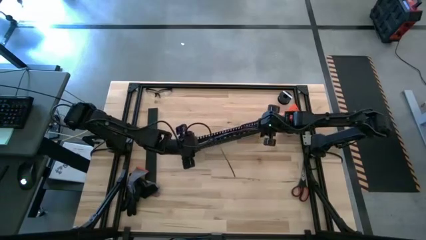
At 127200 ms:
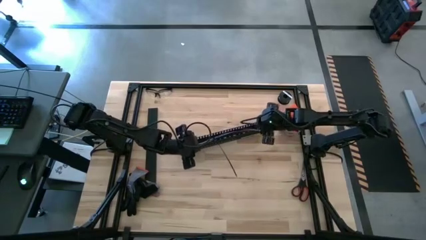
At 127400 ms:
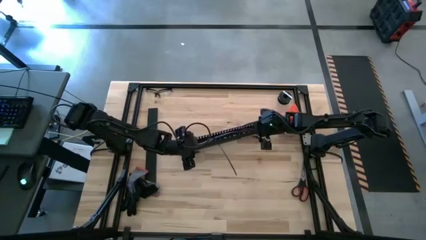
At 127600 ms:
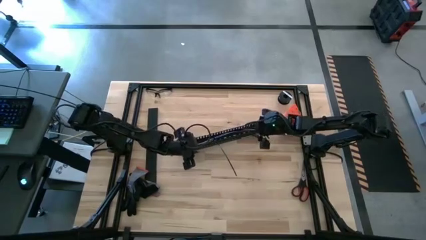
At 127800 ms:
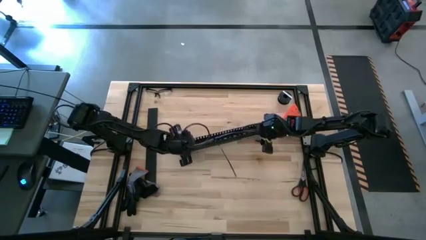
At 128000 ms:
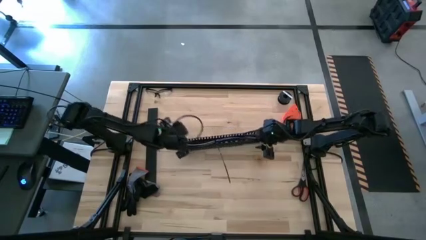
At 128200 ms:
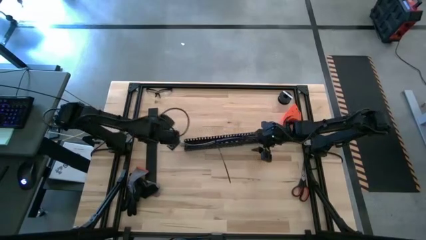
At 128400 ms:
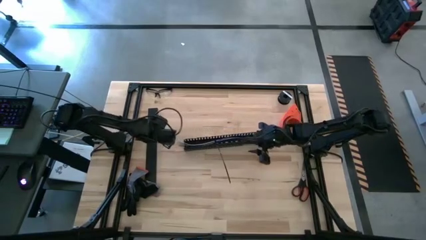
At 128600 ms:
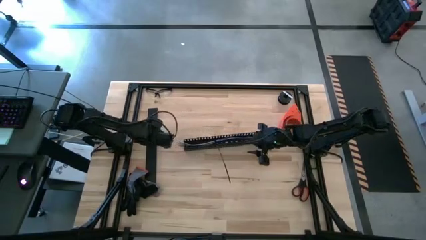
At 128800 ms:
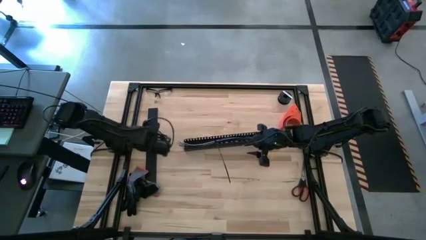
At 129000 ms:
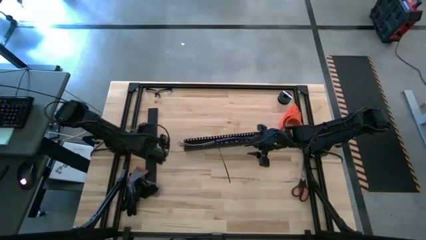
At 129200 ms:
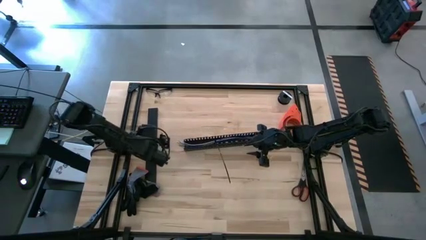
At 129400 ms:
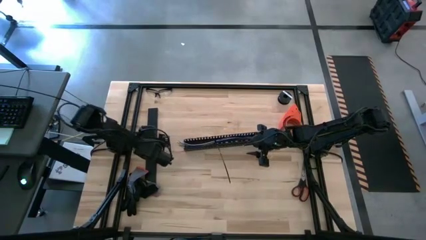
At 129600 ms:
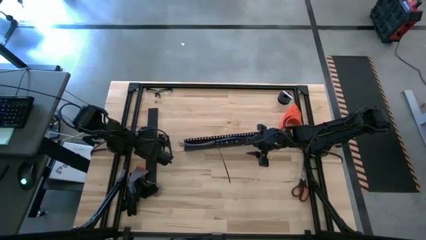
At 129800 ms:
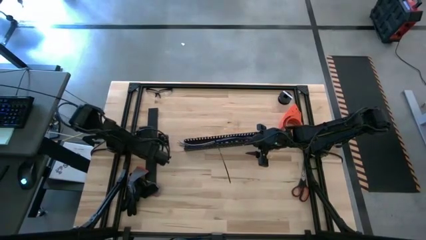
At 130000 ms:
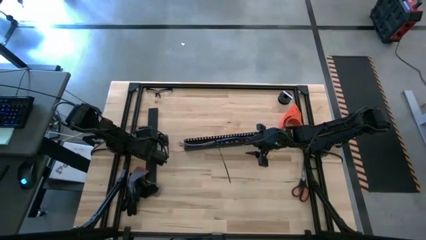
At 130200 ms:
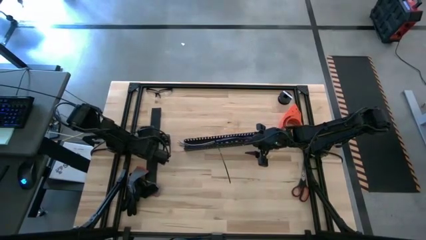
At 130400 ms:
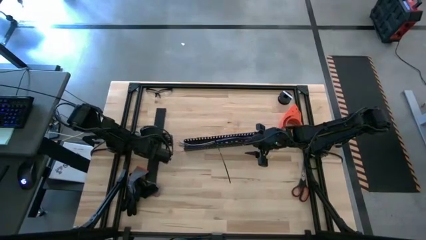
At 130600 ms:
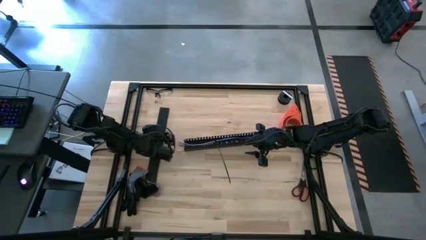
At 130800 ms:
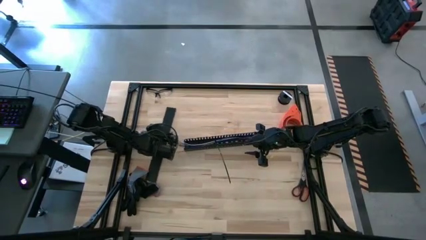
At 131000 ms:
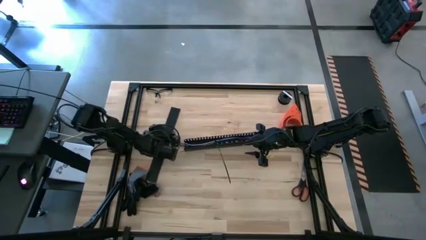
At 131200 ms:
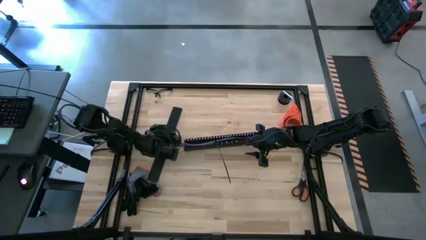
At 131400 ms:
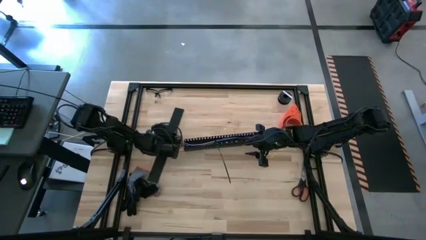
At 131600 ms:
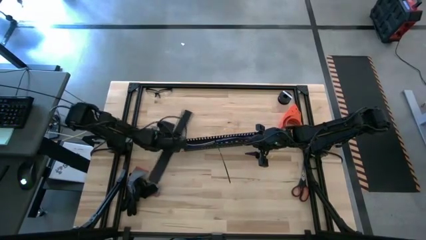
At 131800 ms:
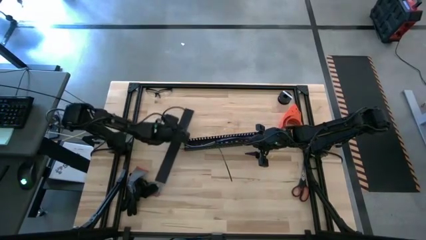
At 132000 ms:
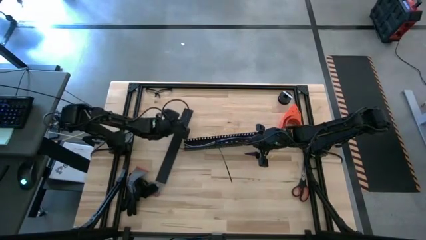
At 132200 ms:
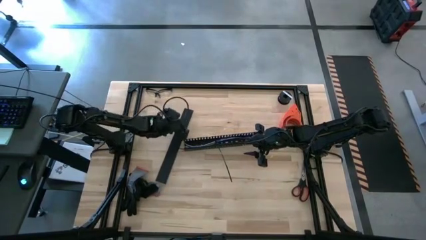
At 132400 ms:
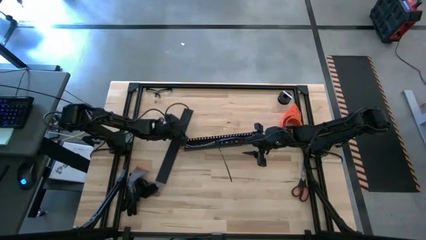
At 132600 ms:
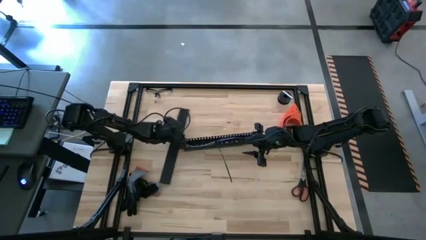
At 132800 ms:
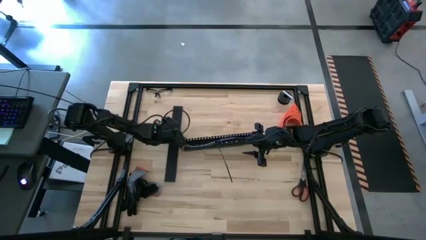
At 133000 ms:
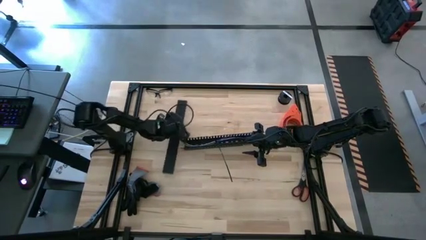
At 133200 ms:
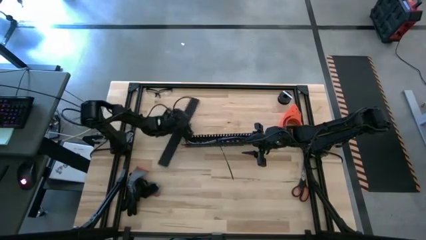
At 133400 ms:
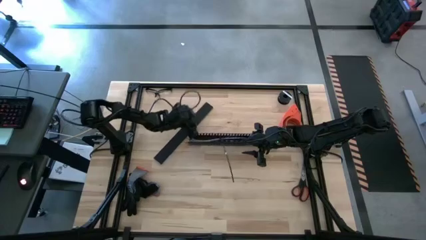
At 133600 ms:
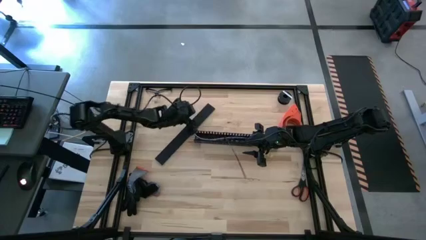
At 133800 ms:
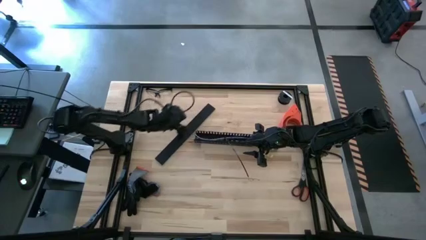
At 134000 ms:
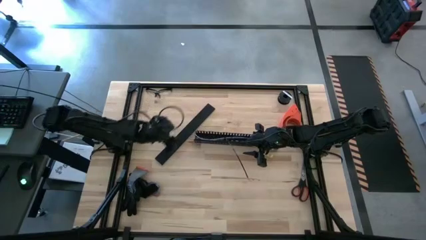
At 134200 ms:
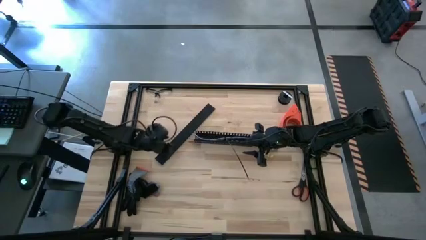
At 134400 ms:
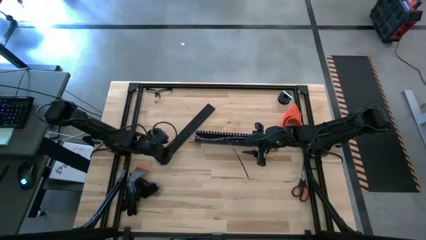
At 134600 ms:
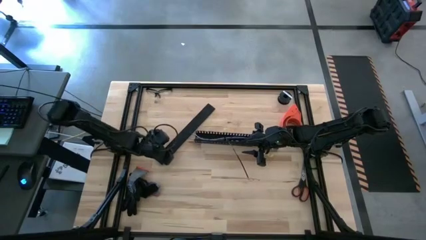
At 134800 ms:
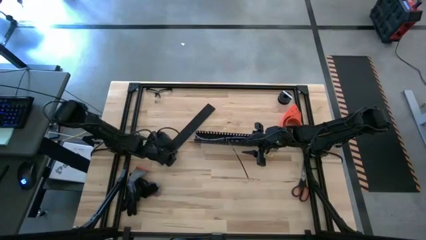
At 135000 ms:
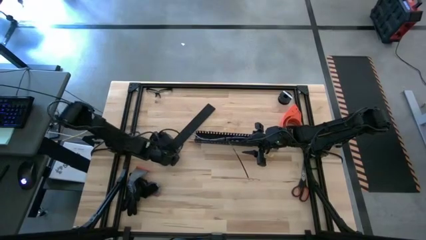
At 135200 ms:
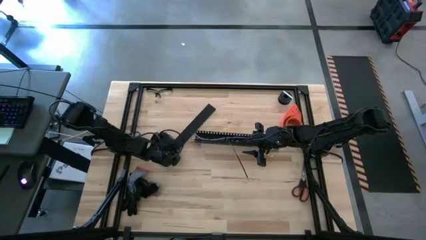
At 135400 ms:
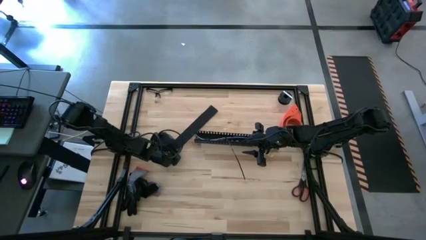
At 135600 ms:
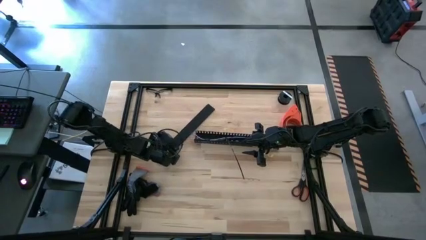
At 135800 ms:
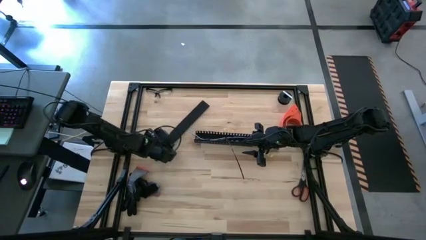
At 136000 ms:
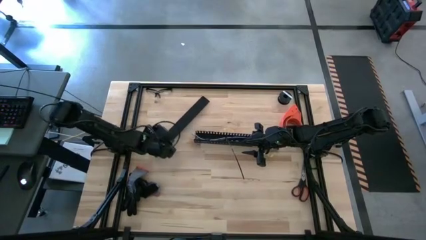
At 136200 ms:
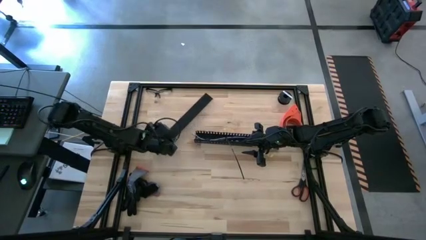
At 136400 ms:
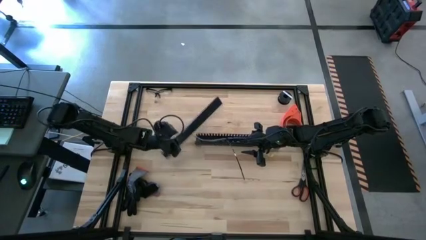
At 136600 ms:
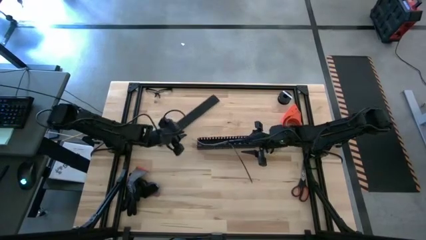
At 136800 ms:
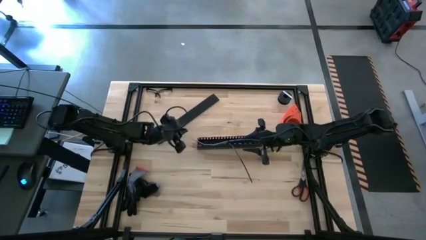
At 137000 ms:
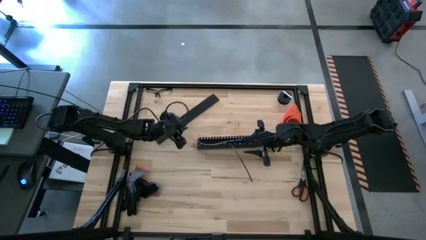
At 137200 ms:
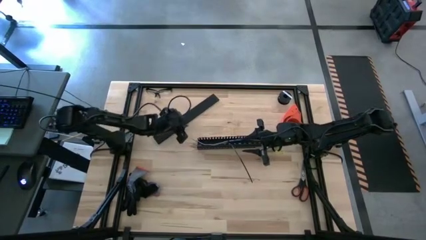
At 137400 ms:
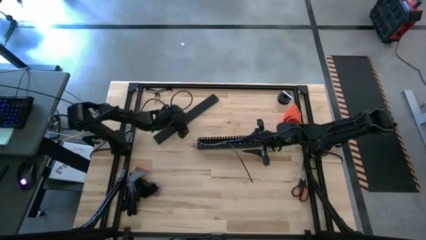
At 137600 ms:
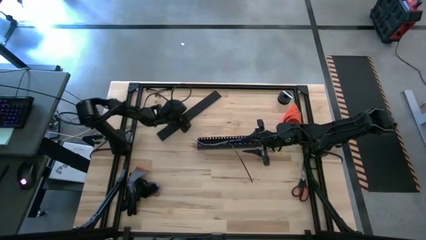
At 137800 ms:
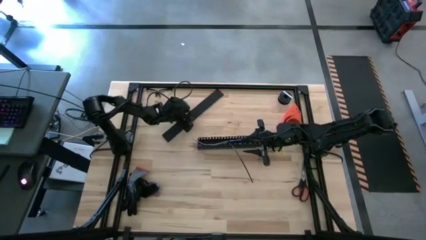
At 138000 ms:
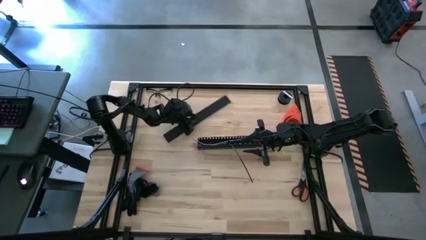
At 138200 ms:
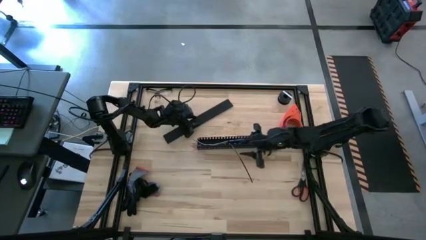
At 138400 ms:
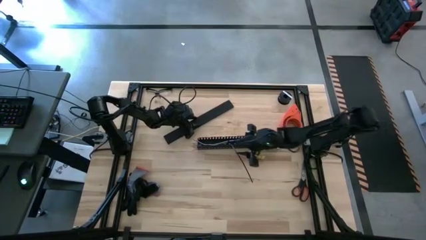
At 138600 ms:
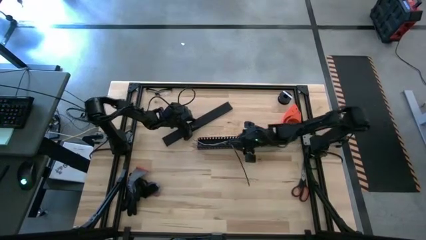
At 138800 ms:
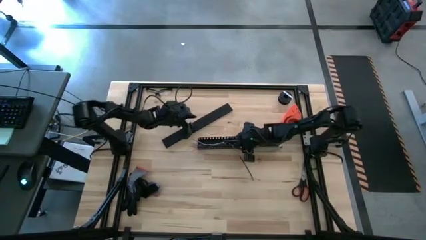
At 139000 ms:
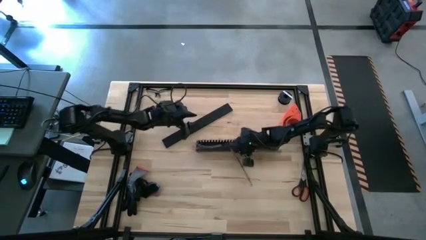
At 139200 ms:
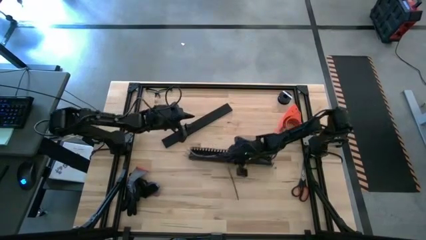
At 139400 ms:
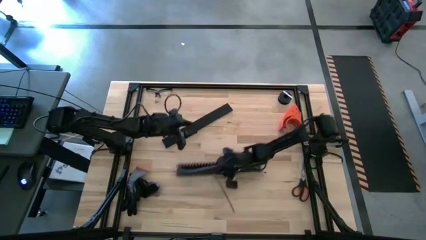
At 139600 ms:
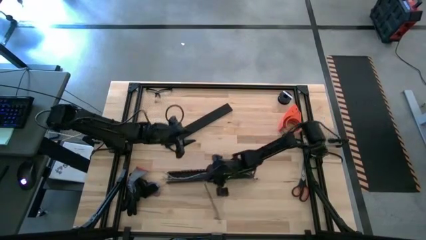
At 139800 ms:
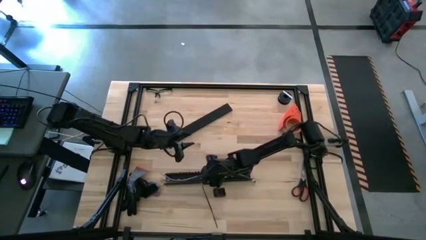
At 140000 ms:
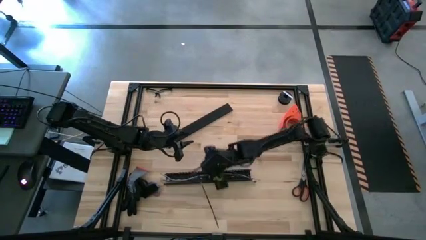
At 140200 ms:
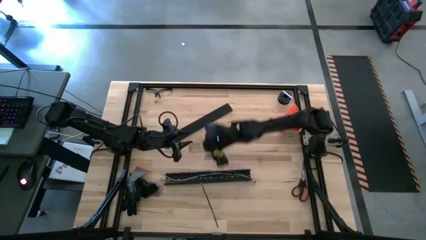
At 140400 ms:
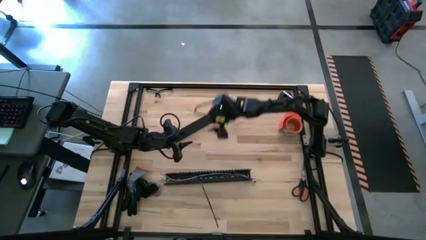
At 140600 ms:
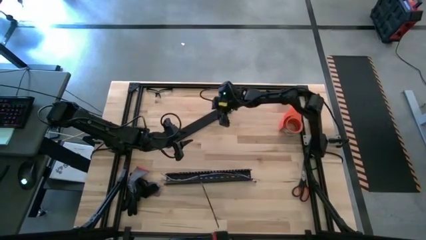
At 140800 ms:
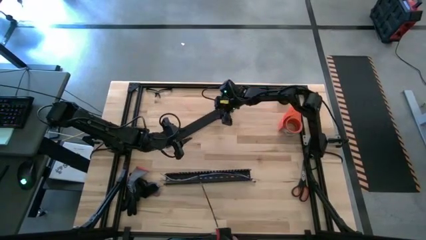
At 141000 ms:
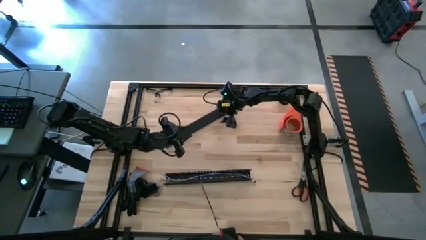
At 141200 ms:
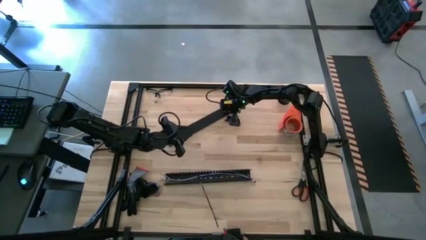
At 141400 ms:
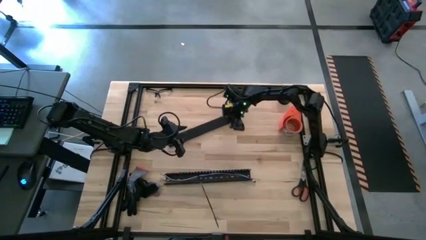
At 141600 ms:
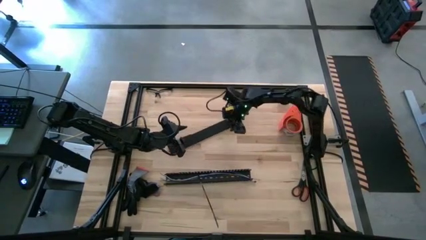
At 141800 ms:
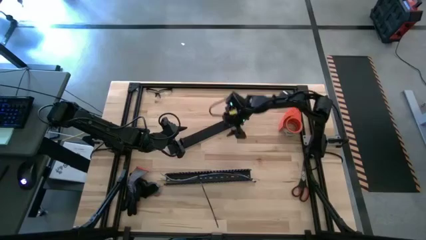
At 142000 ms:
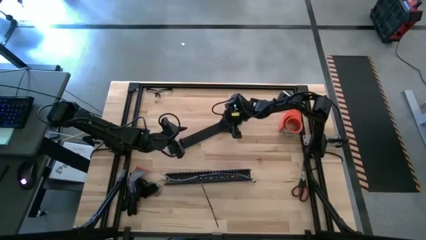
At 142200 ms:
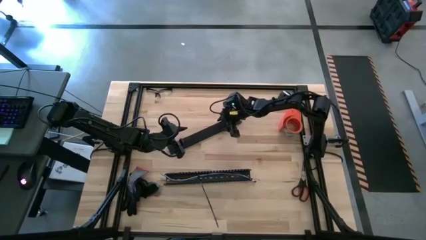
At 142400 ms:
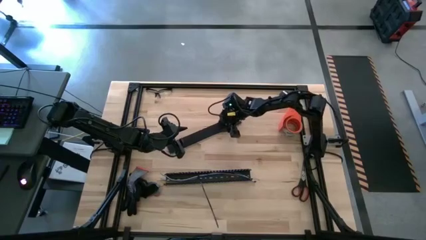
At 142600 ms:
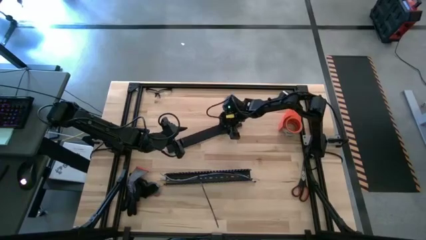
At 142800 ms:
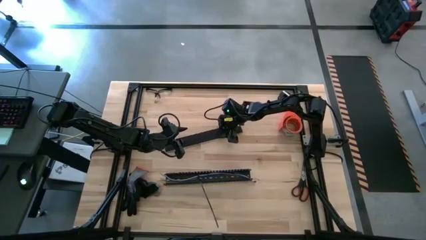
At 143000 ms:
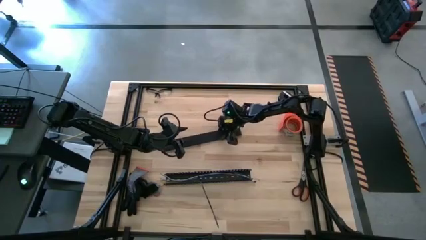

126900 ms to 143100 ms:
Task: Ziptie cables
Close the black cable duct with a black cable duct lid

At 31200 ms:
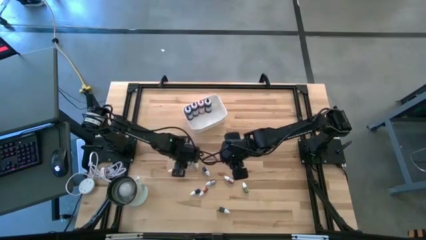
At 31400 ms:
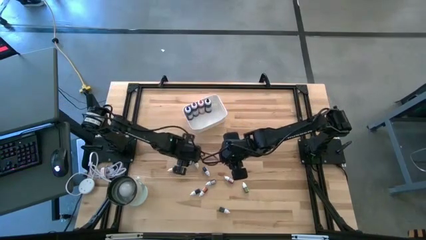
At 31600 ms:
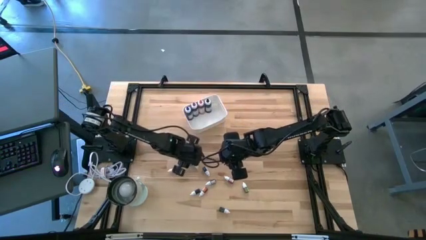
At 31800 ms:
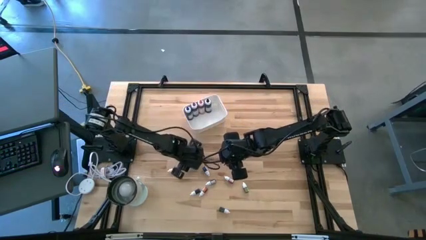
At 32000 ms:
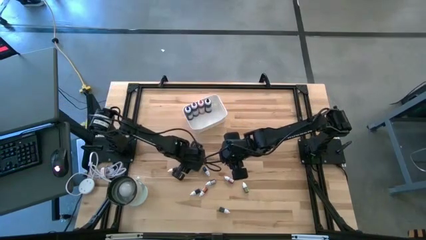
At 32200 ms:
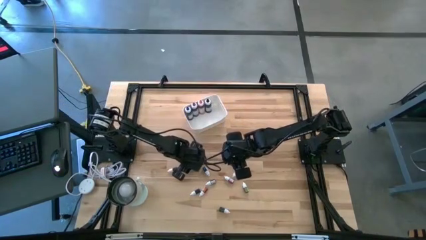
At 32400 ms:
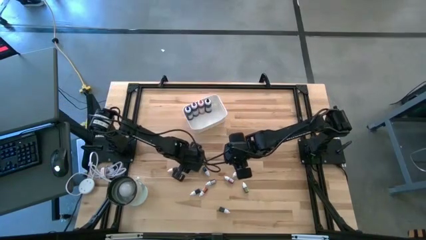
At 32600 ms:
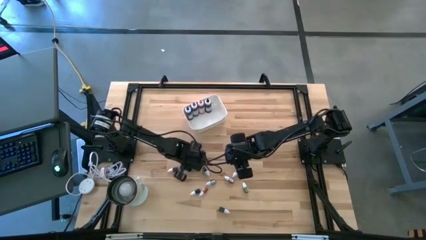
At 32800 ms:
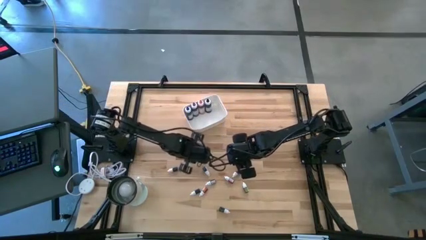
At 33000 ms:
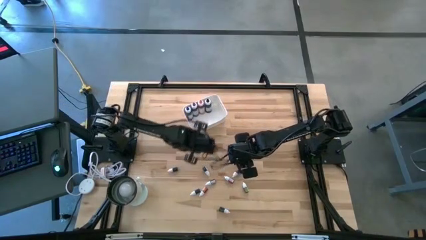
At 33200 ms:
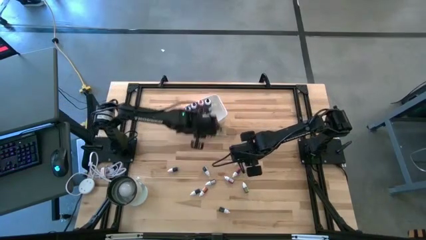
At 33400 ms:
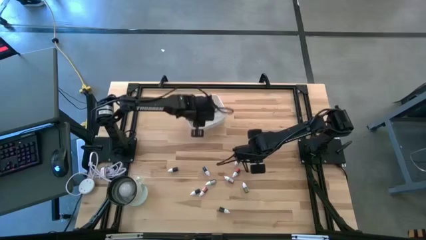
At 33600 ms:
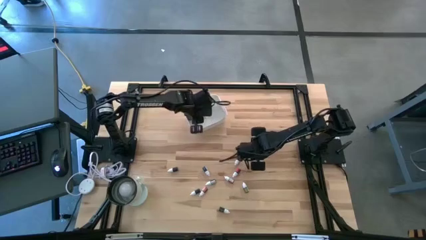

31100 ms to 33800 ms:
Task: Pick & Place food coloring
Put the left small green food coloring bottle into the white bin
